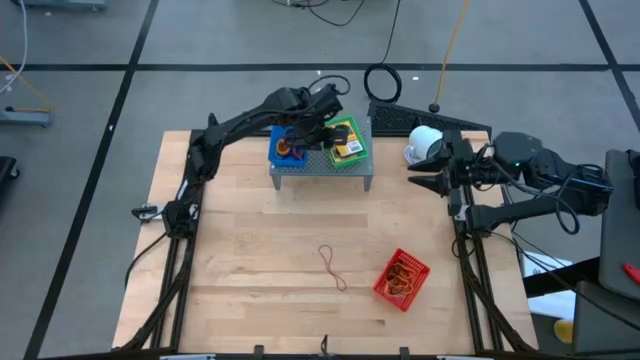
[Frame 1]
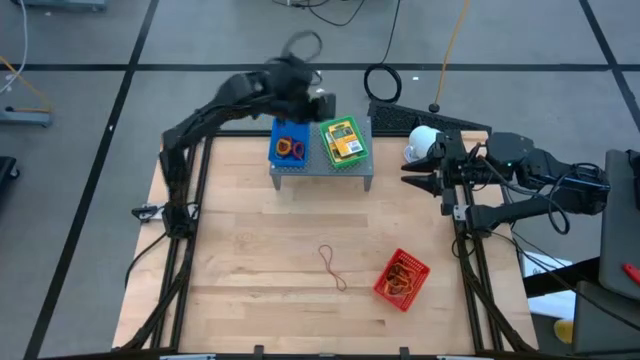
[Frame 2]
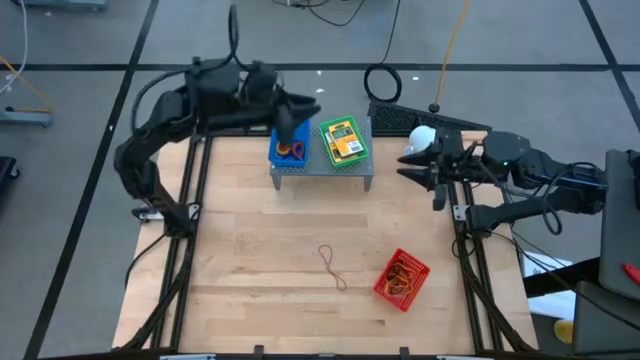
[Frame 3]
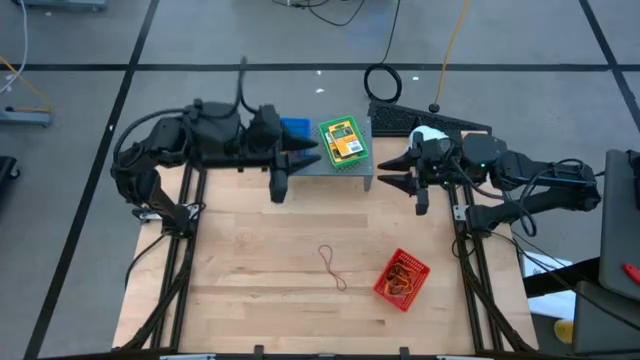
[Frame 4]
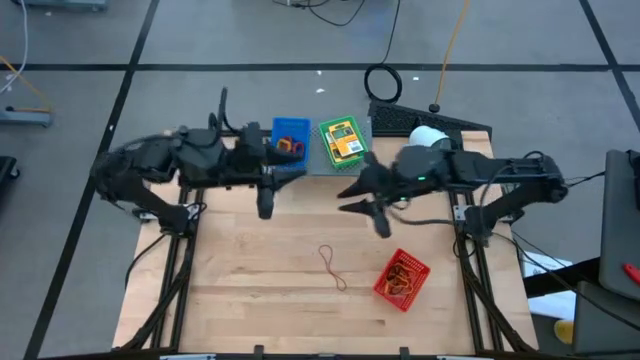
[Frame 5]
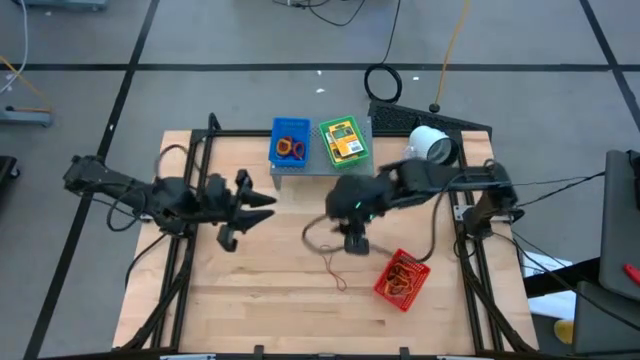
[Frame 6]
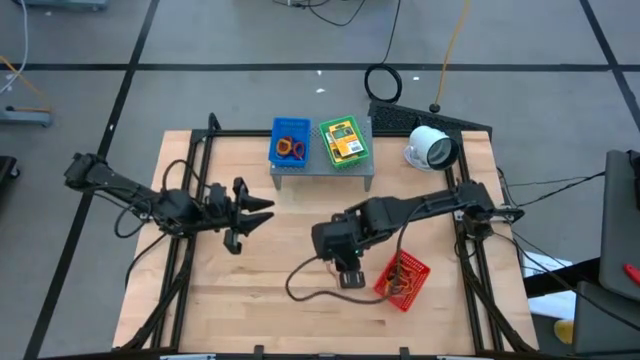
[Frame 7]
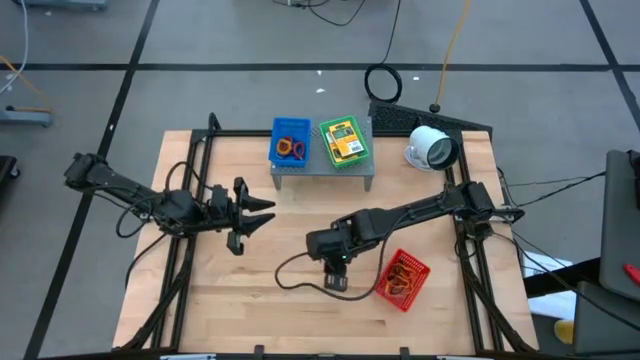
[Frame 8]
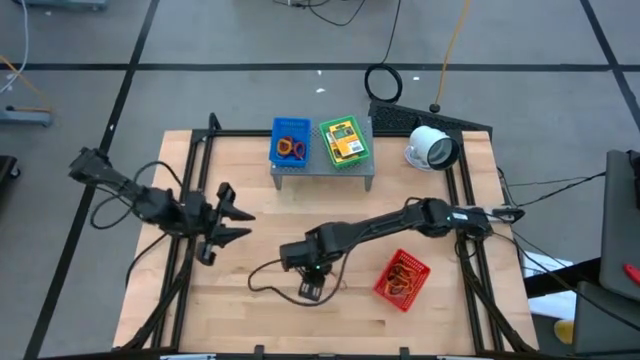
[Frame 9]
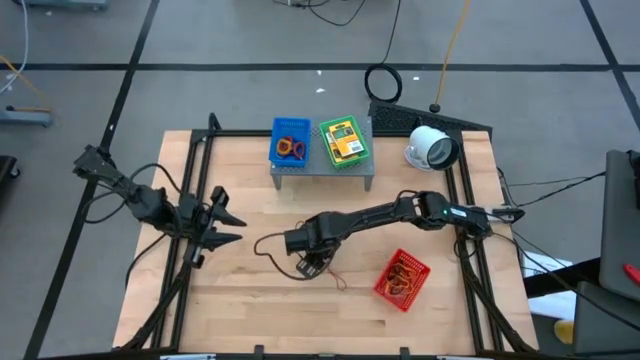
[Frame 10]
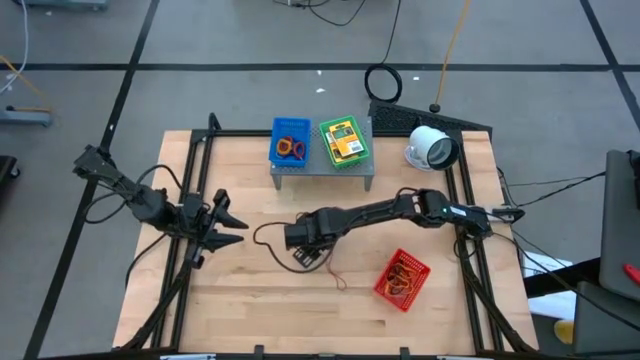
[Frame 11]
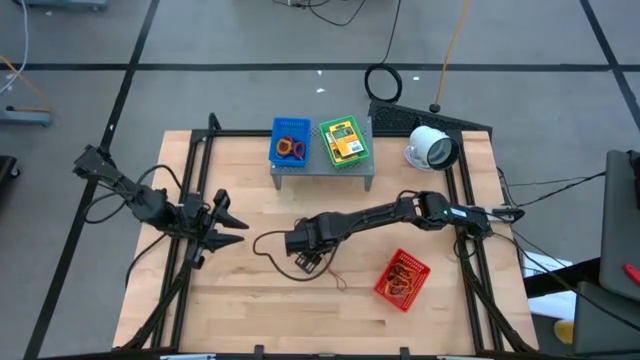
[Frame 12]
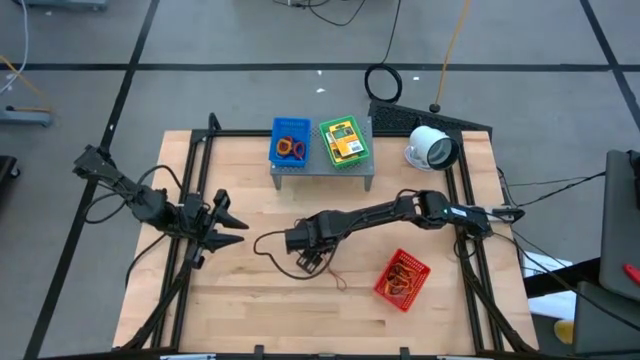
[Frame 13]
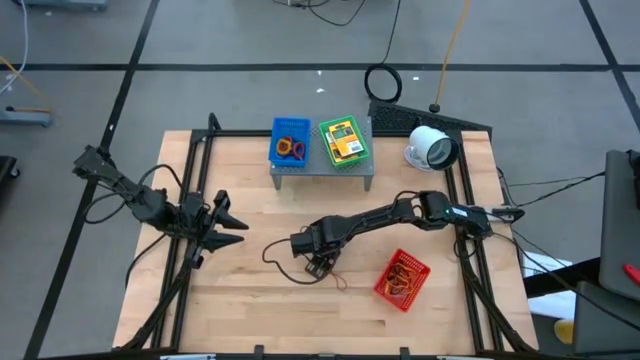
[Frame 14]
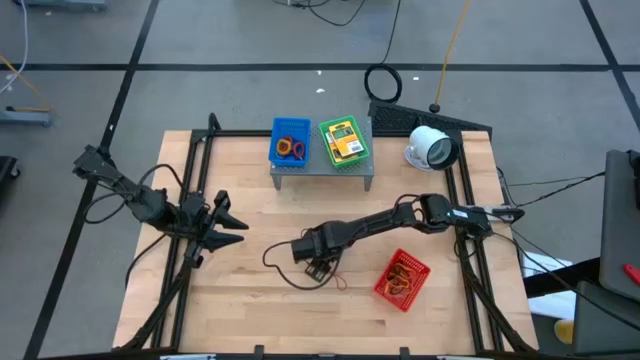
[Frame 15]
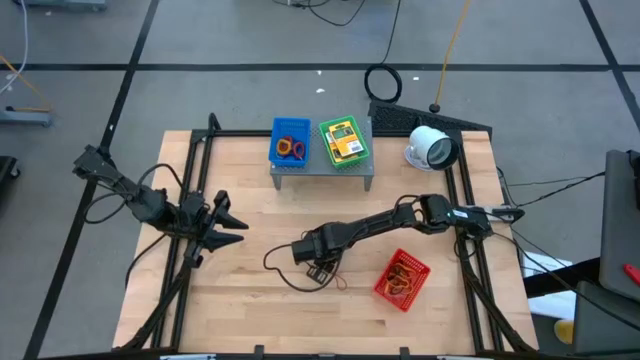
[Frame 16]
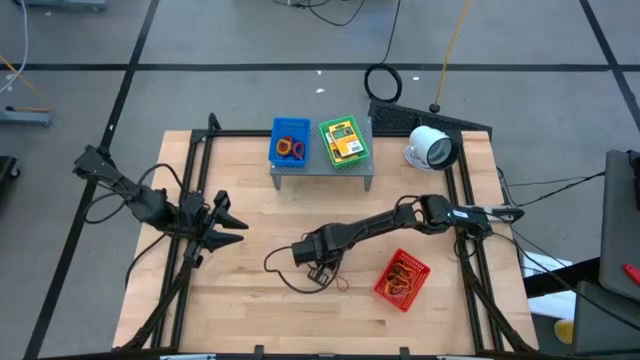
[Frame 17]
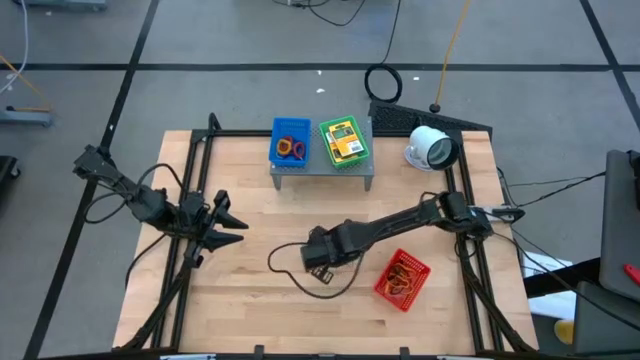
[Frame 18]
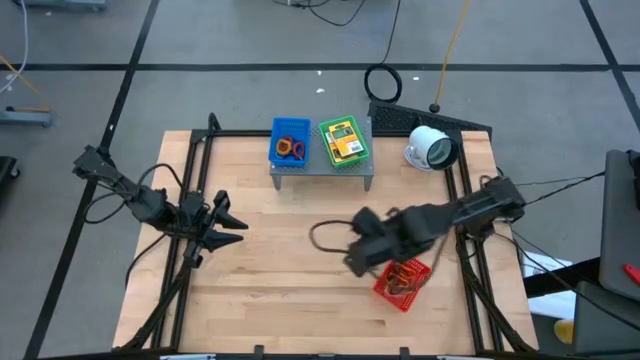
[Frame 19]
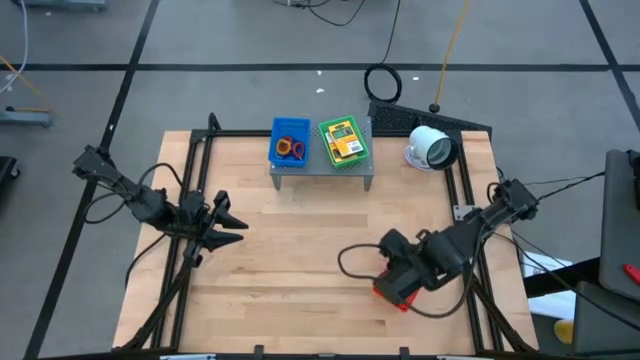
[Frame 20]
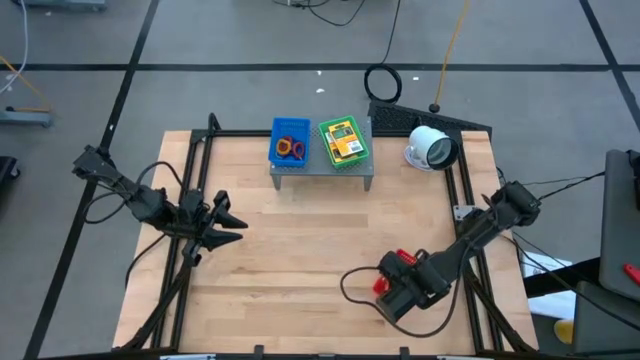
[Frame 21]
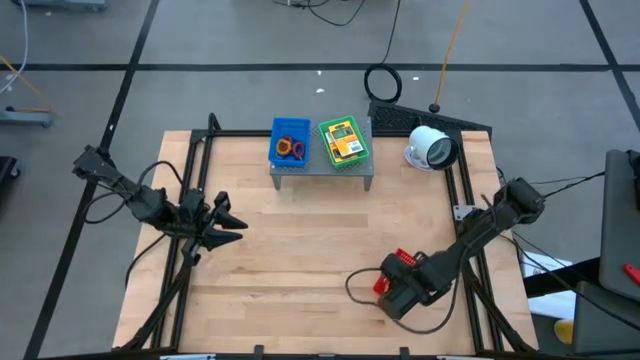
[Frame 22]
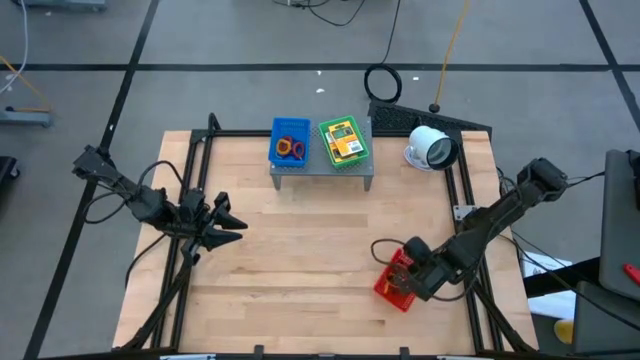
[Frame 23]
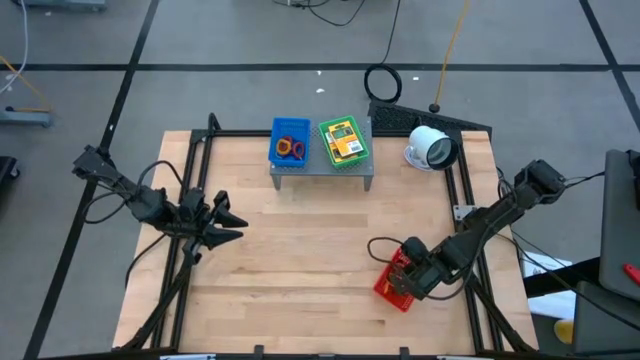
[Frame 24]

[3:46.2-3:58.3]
Task: Pick & Place Office Desk Supplies
Put the red rubber band into the red bin

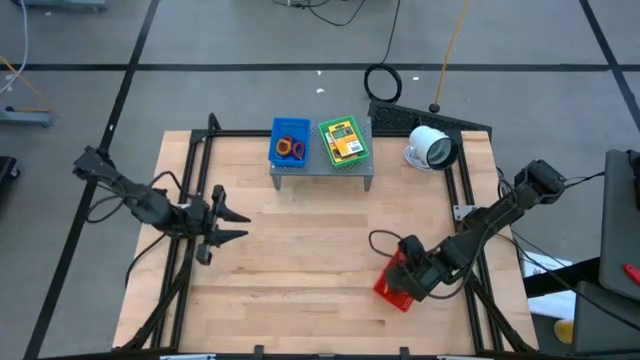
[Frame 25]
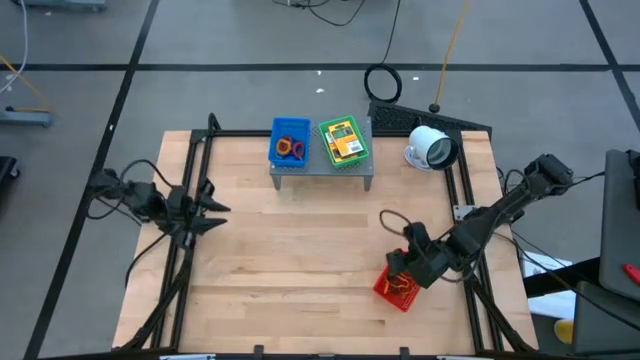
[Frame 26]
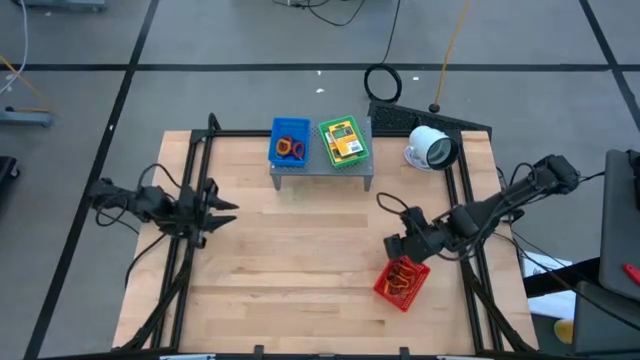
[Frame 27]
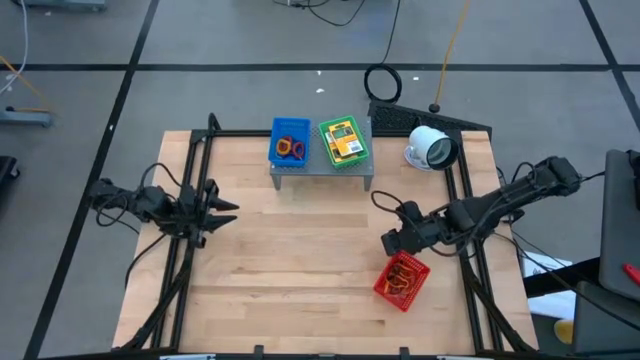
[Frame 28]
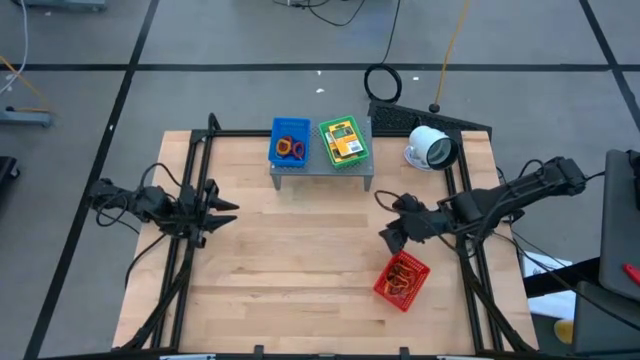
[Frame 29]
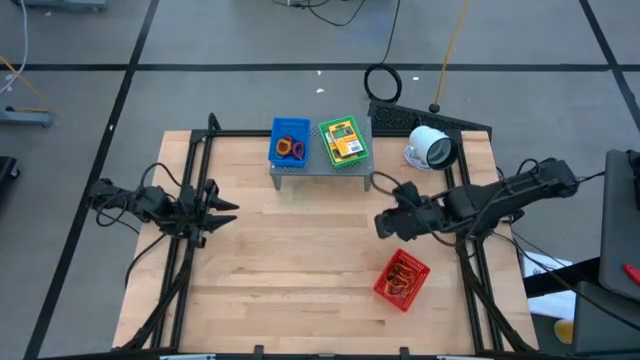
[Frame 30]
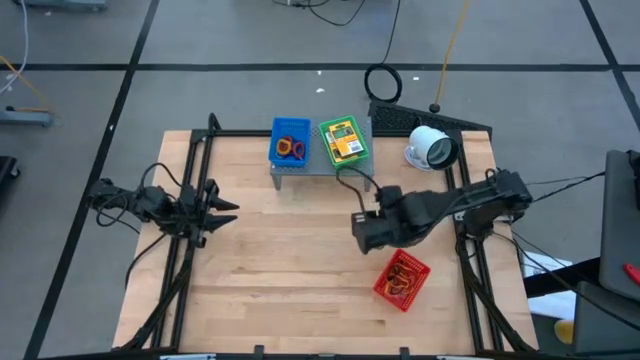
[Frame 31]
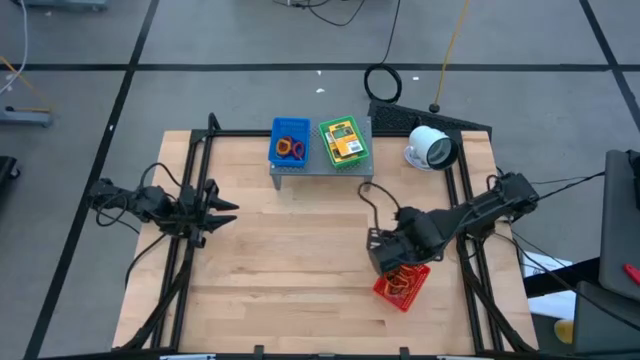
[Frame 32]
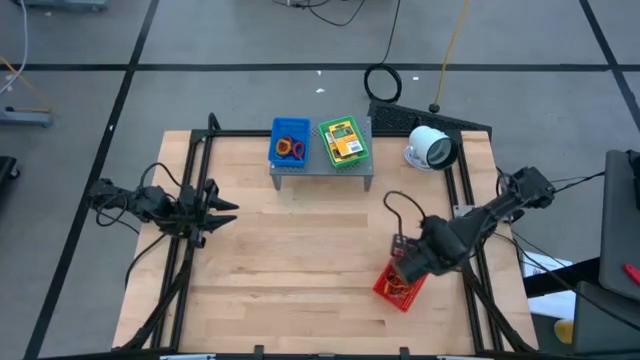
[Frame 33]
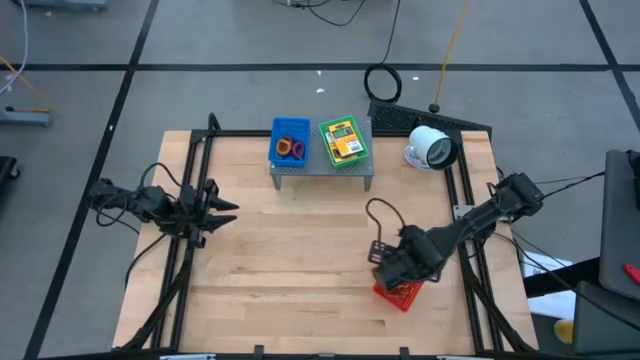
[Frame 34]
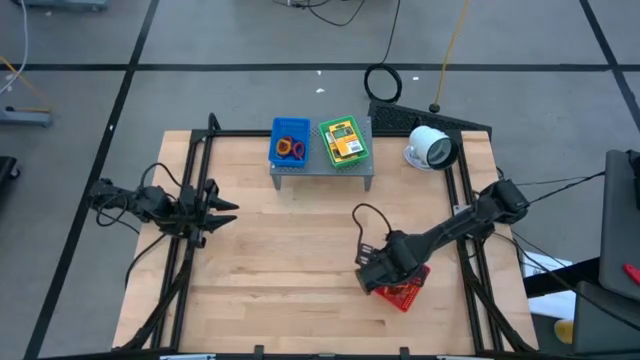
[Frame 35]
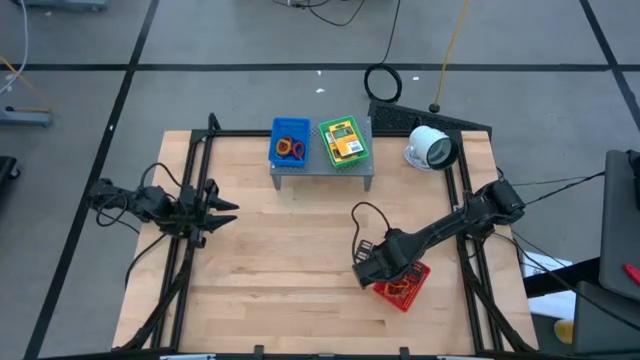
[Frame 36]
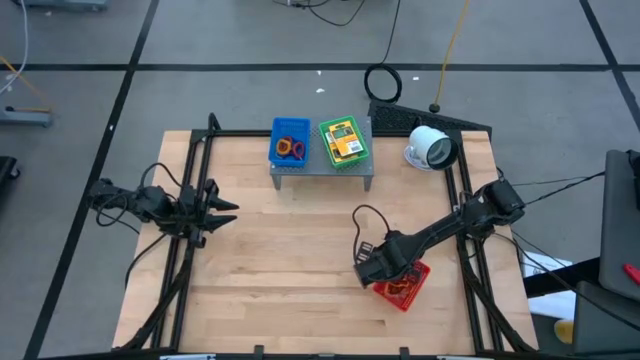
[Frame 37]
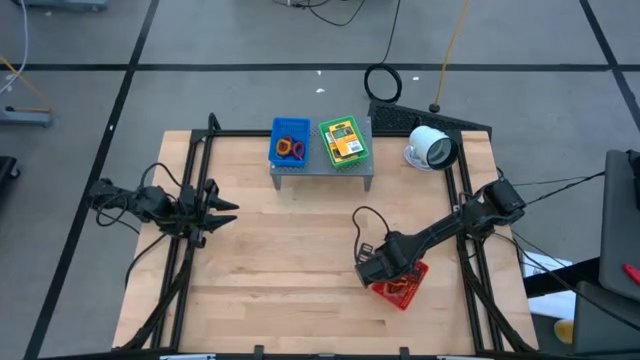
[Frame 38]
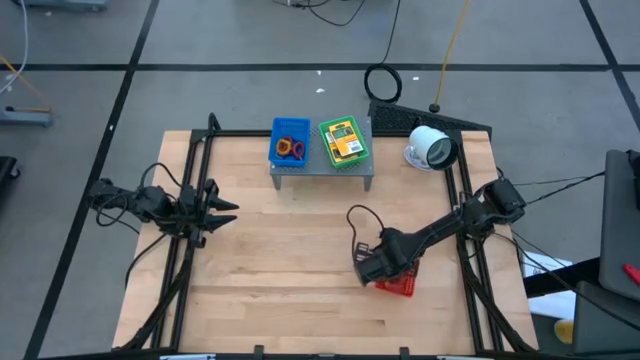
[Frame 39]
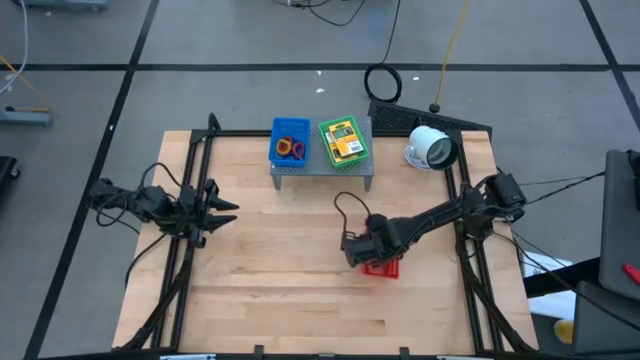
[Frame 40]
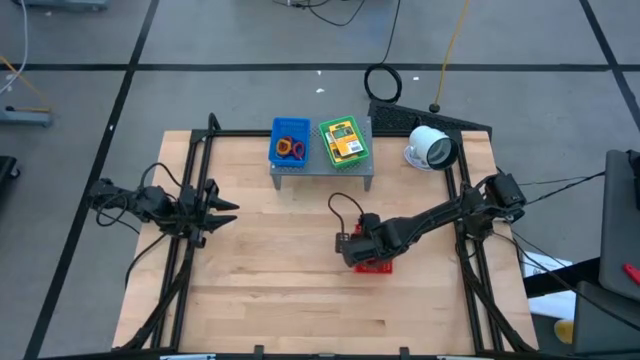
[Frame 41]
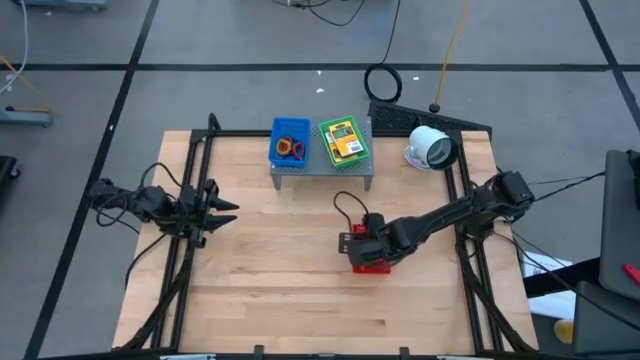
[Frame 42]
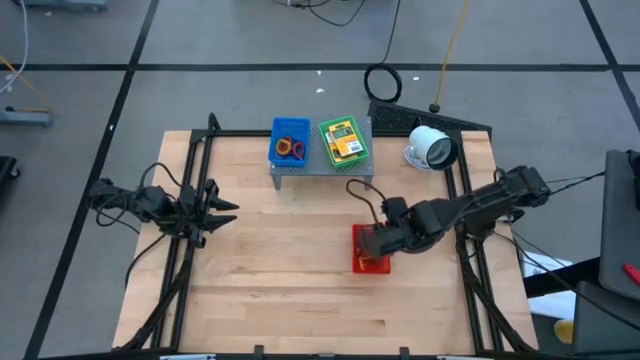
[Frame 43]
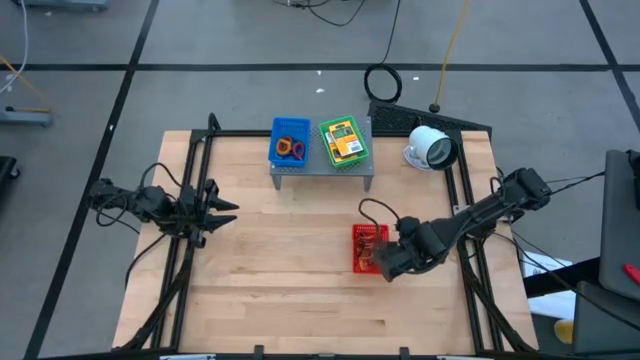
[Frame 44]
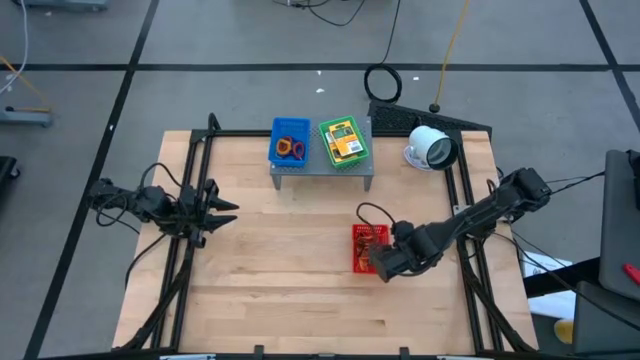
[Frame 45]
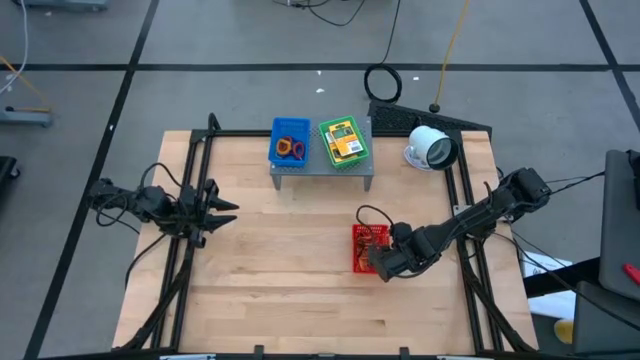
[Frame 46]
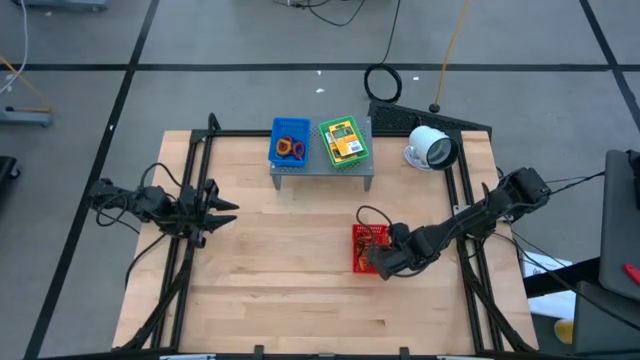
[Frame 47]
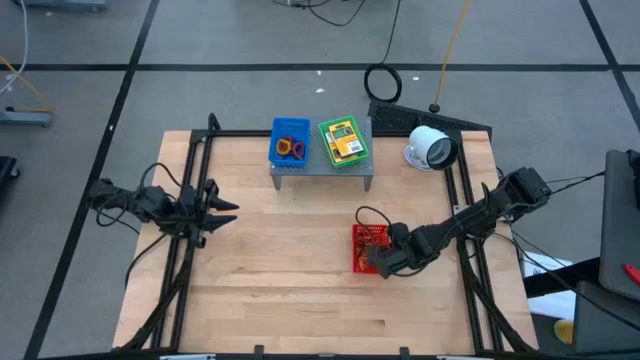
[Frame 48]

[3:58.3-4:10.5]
Put the red bin on the shelf
